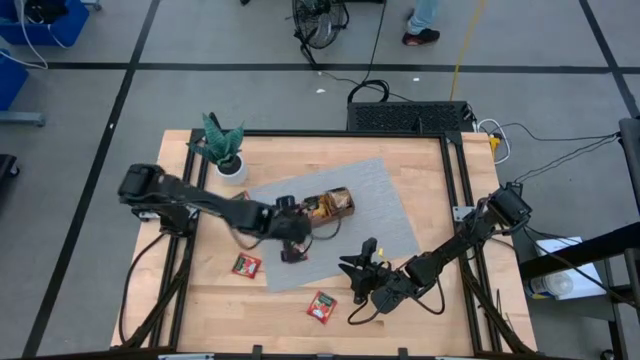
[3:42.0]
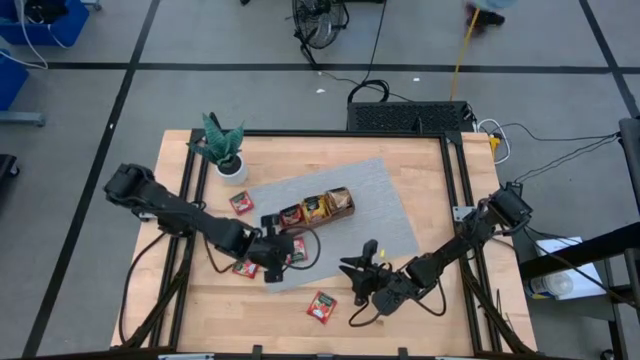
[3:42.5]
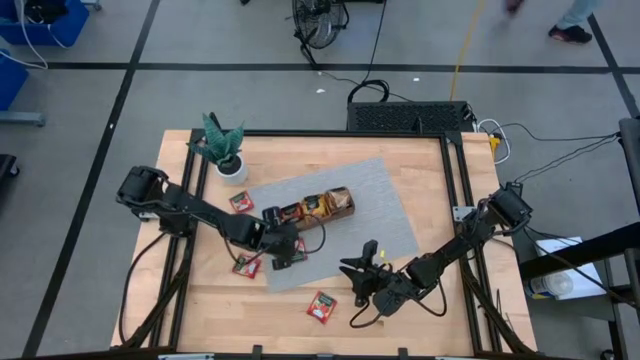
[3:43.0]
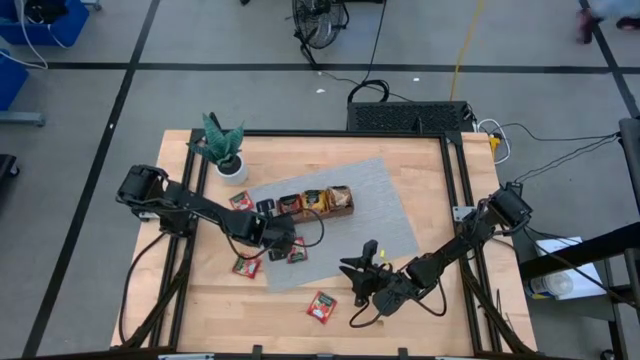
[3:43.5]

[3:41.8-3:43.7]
Task: Pick & Place Tea
Adjust the wooden organizer

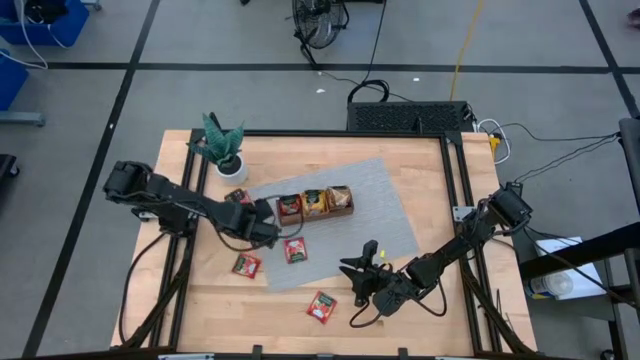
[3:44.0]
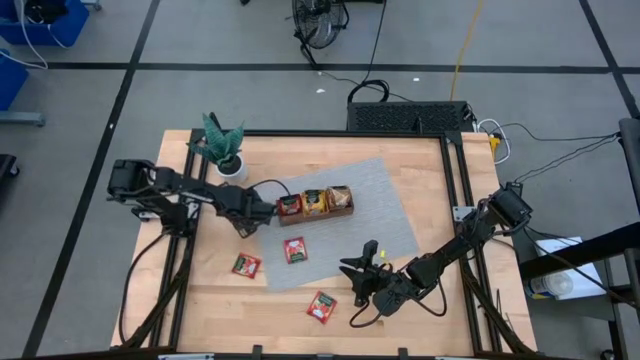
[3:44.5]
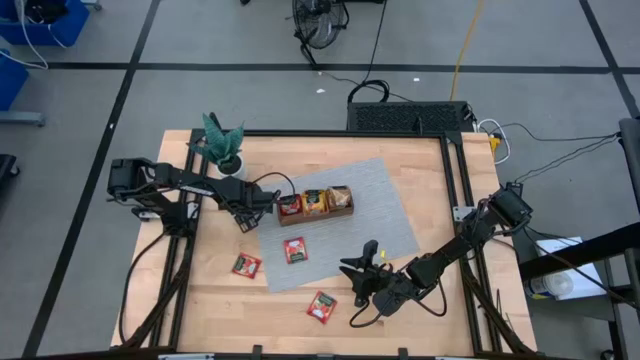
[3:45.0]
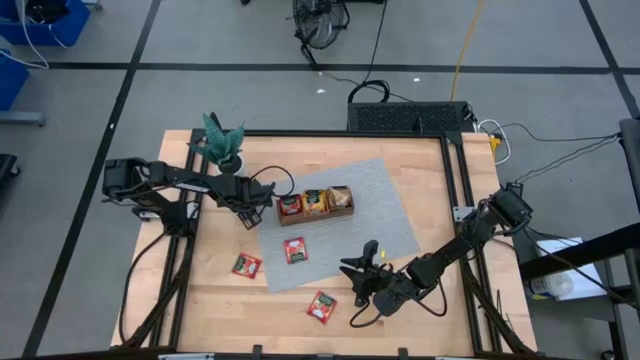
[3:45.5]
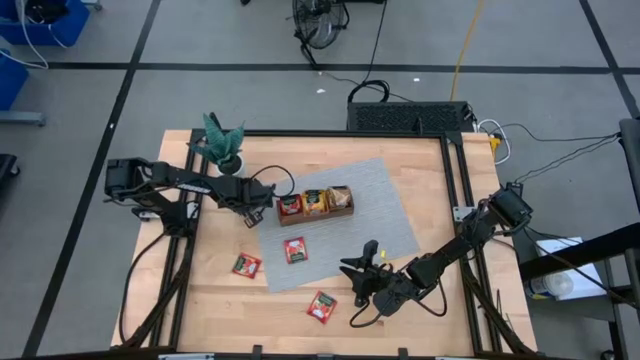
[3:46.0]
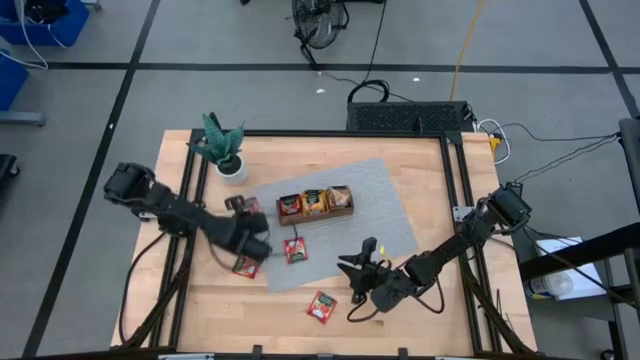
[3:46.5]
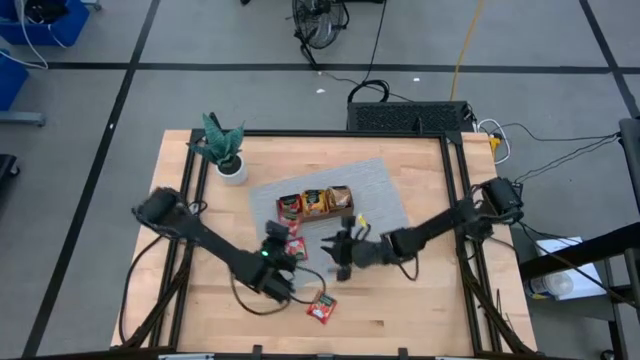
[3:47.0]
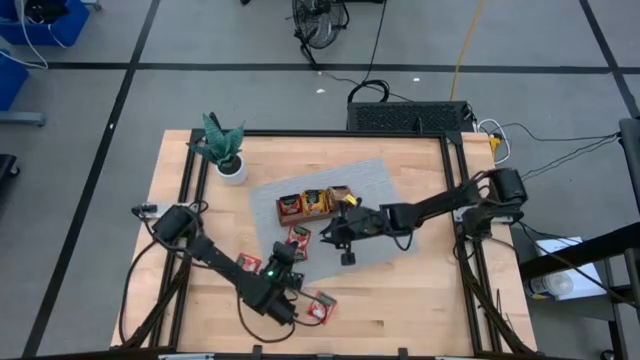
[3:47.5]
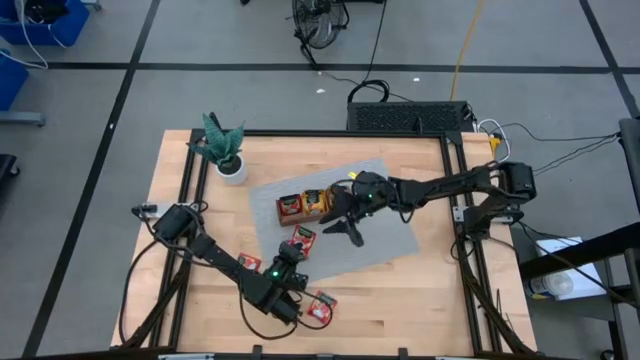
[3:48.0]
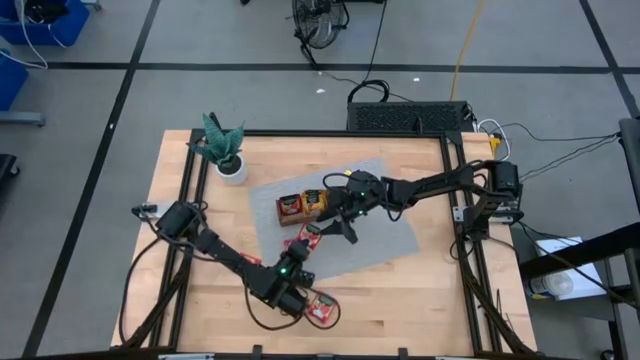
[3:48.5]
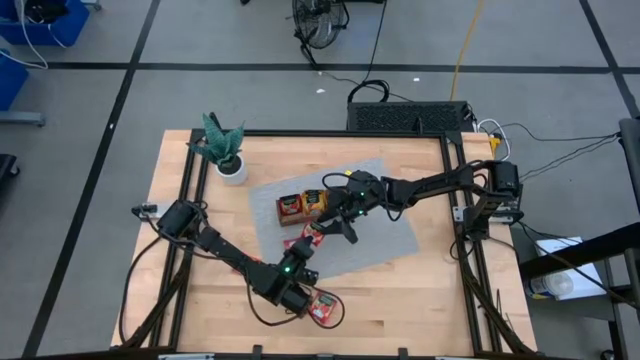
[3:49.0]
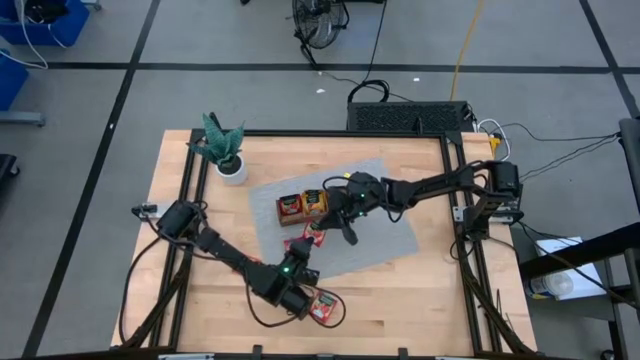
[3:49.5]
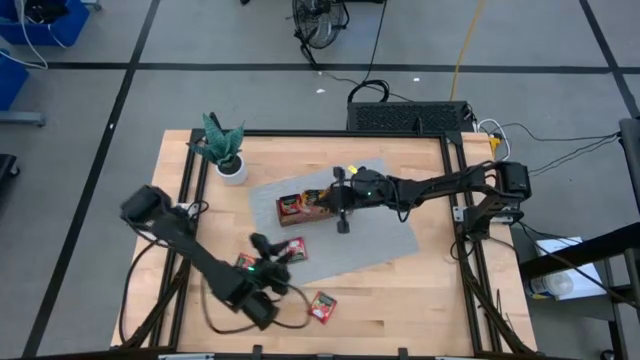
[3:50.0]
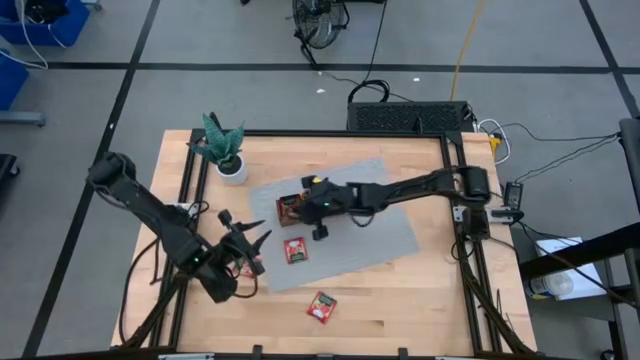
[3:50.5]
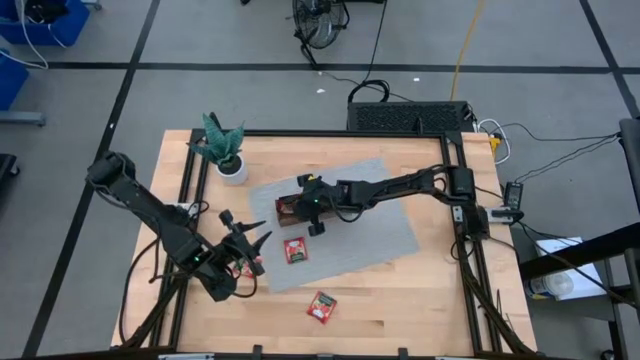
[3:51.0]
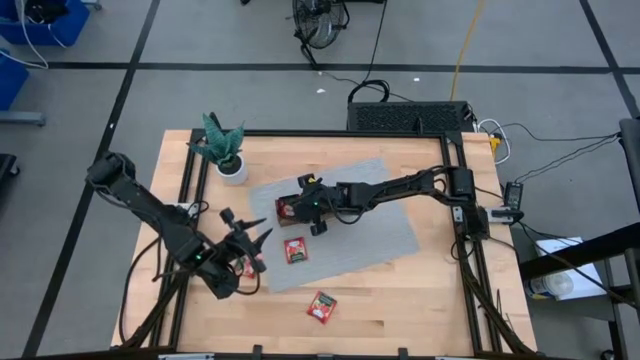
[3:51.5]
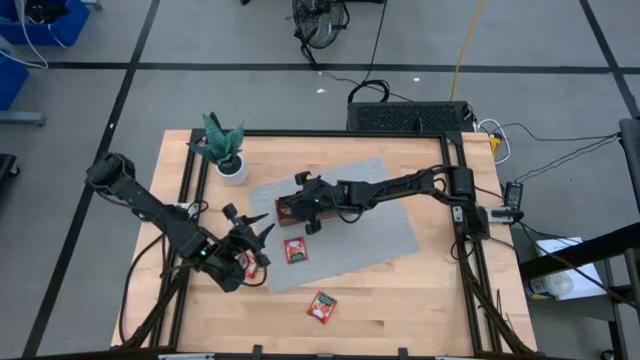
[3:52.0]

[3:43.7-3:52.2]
Put the red tea into the left part of the wooden organizer

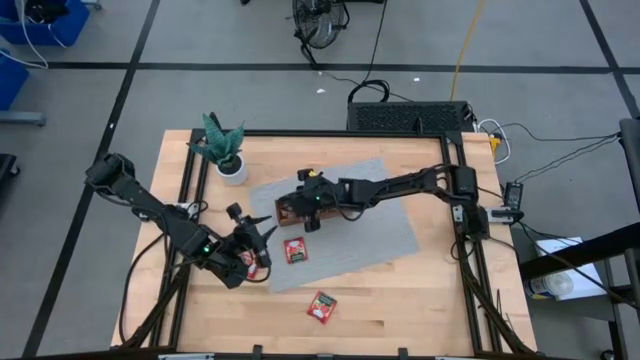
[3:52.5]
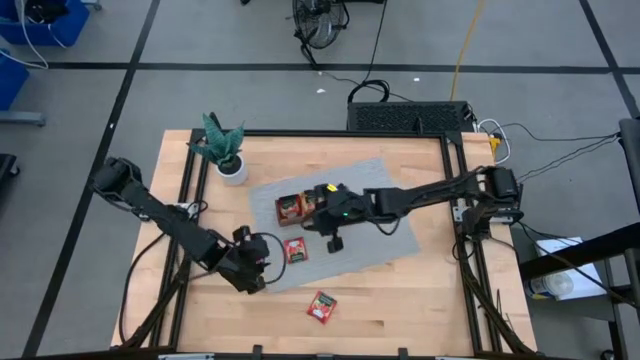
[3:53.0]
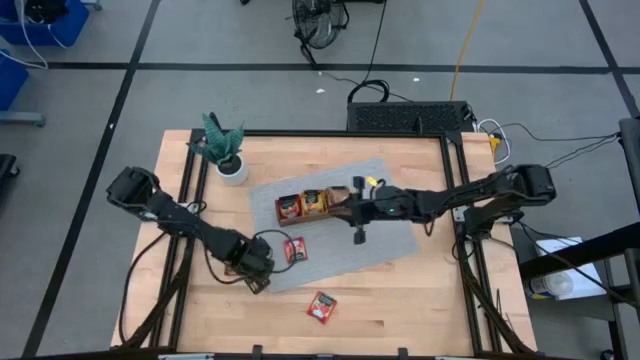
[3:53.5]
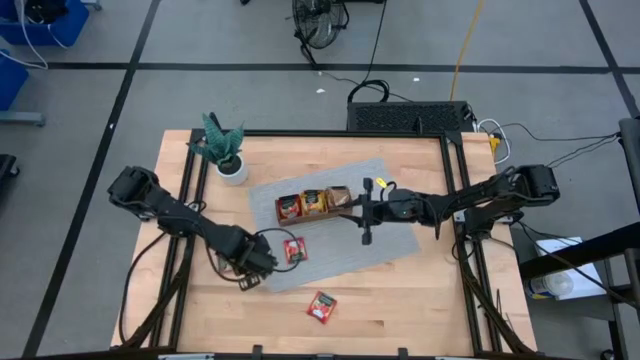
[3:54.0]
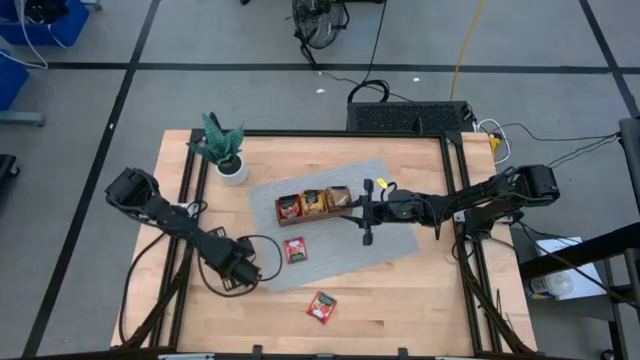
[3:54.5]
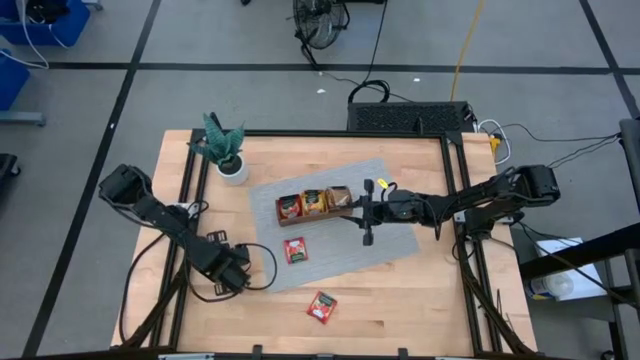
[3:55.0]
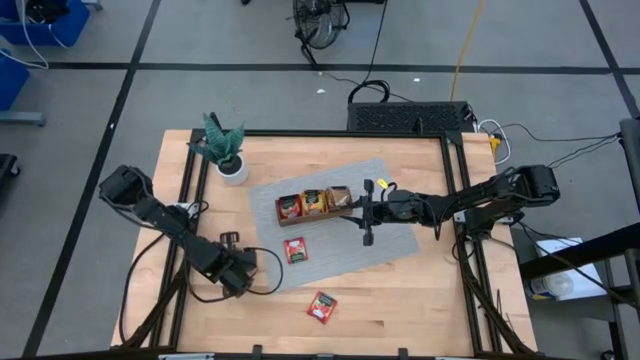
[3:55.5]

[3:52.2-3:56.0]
Put the top right red tea into the left part of the wooden organizer

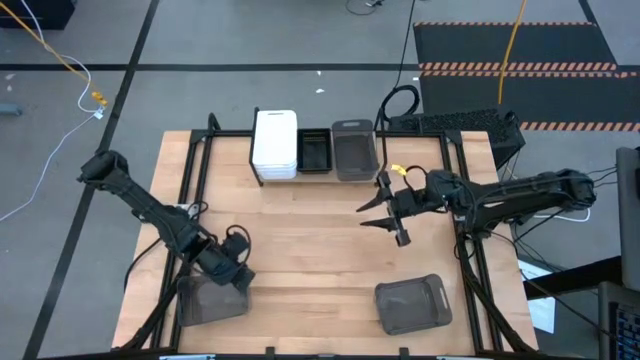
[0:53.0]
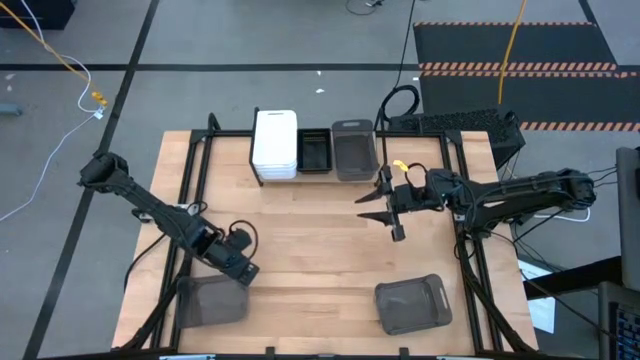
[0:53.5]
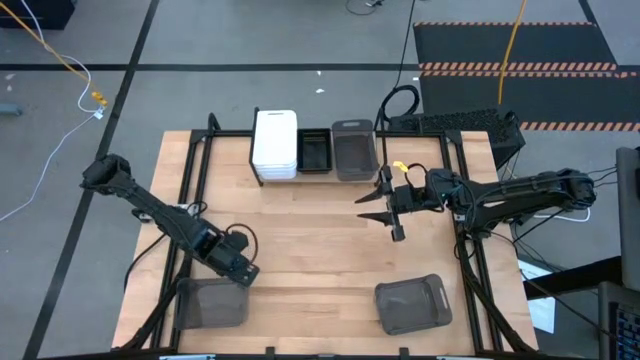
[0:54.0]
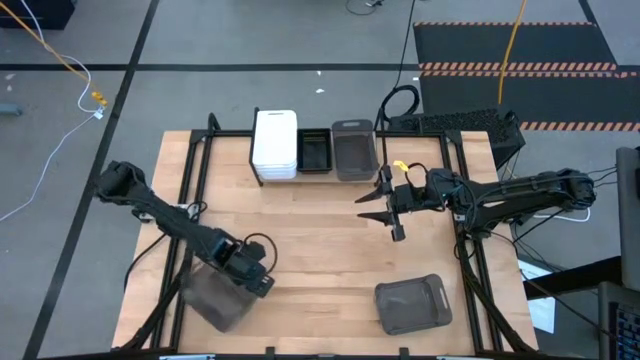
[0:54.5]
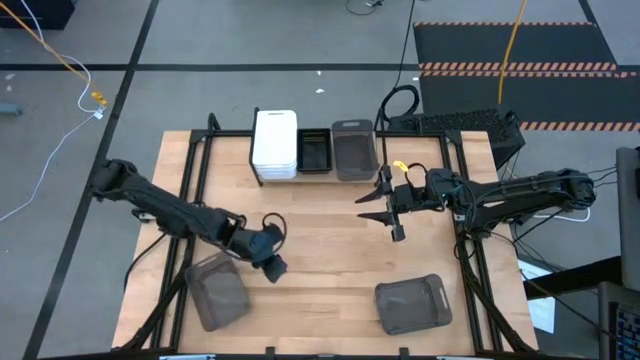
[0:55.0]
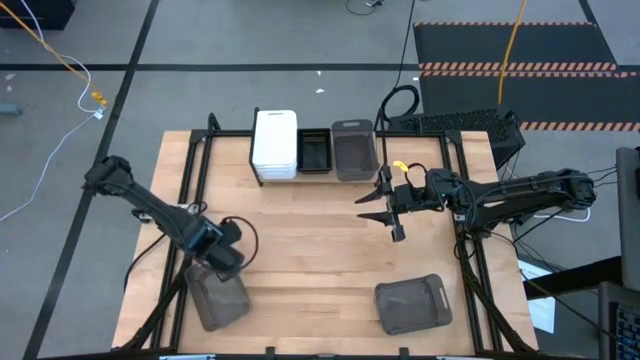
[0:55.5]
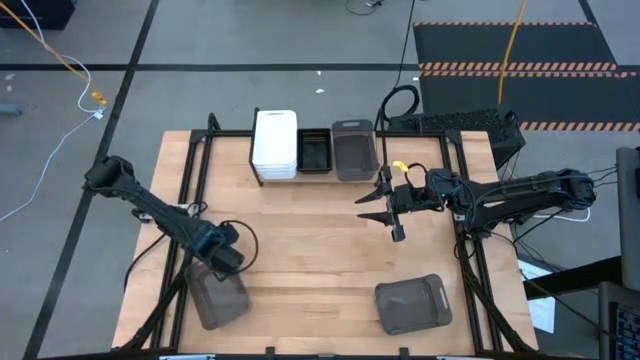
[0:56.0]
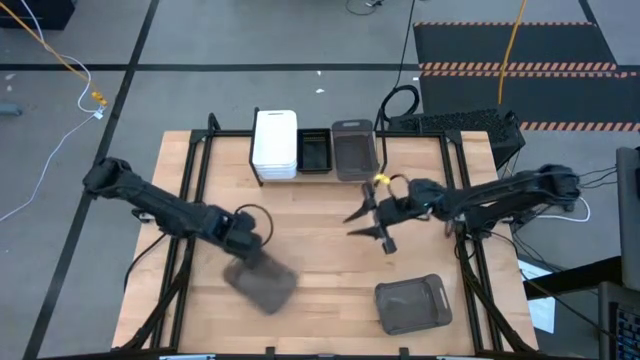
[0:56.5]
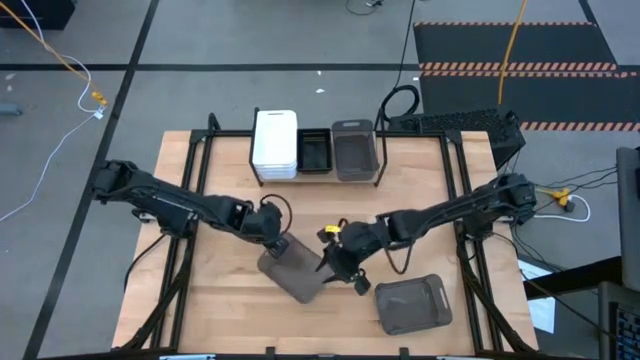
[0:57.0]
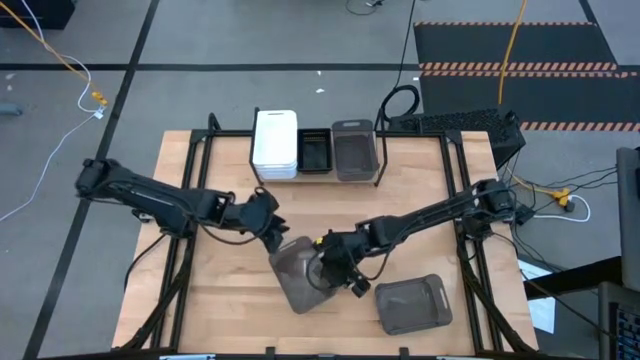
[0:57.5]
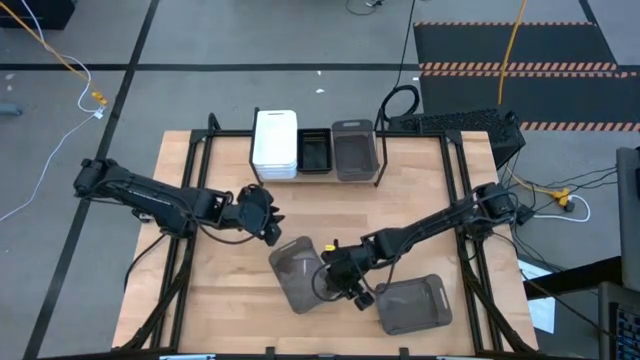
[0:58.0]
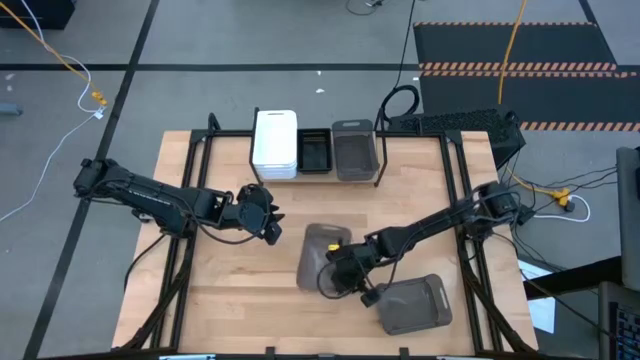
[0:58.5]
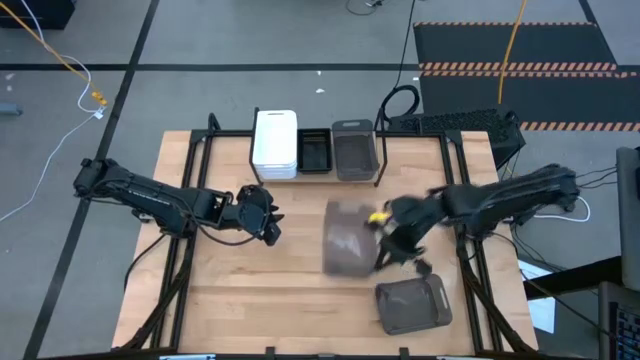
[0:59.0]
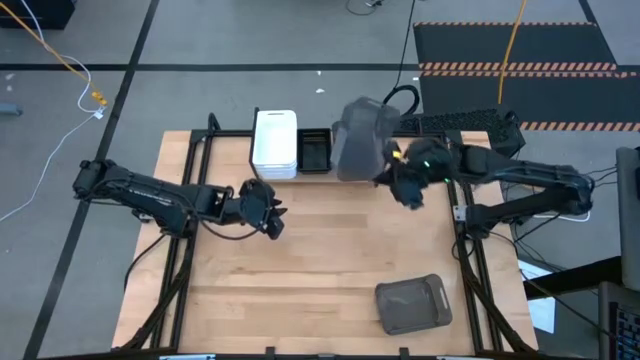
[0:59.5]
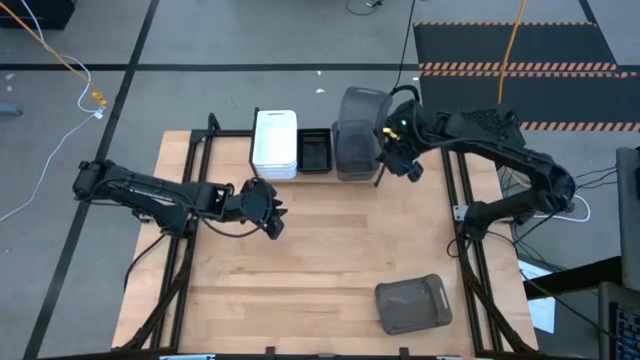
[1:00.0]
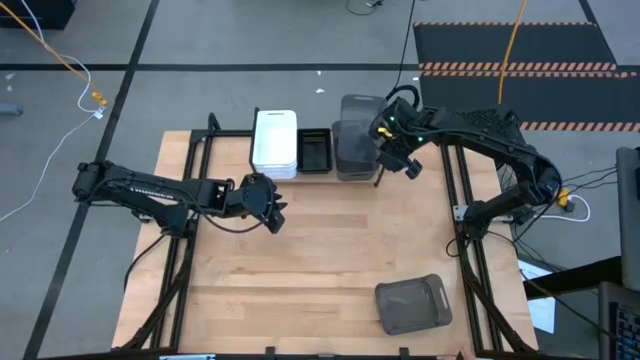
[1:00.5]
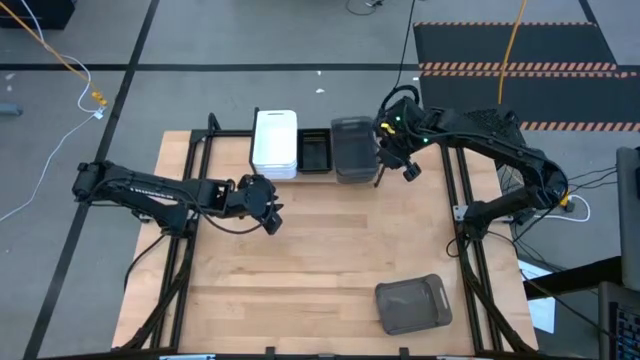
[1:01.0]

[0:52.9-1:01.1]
Task: Stack baskets on shelf by color
Stack the left gray bin on top of the other gray bin on the shelf
